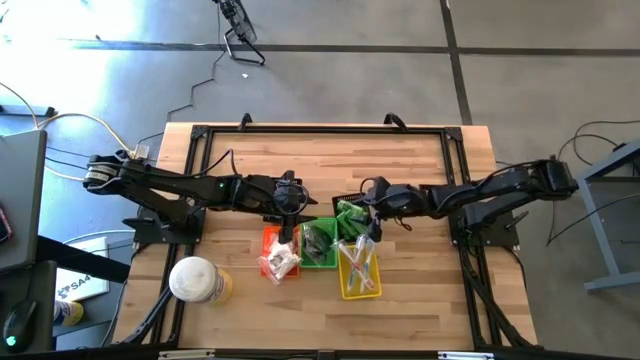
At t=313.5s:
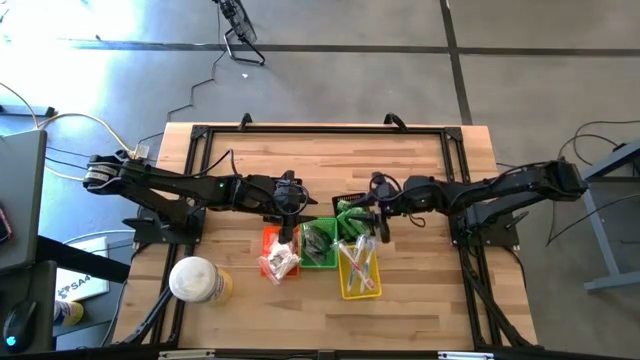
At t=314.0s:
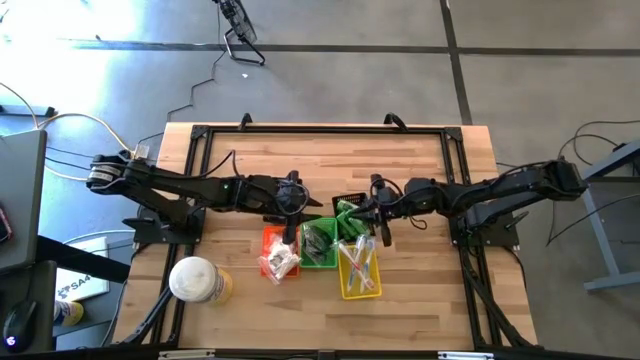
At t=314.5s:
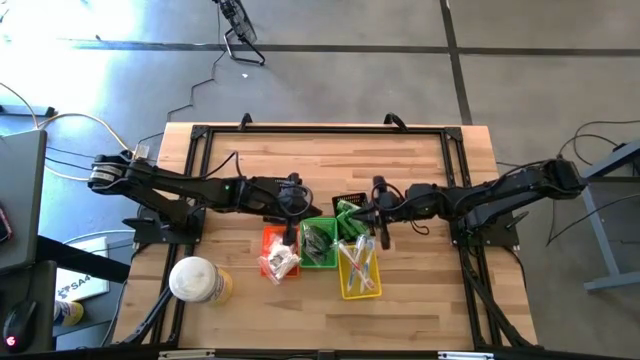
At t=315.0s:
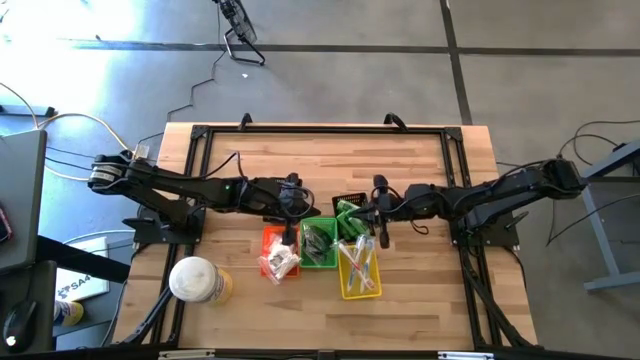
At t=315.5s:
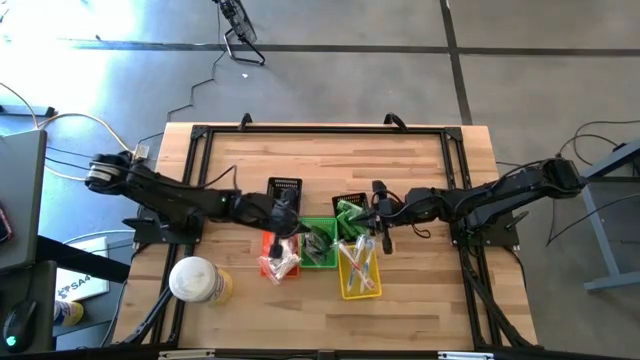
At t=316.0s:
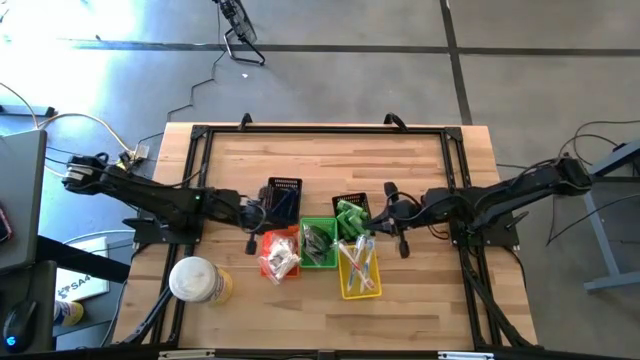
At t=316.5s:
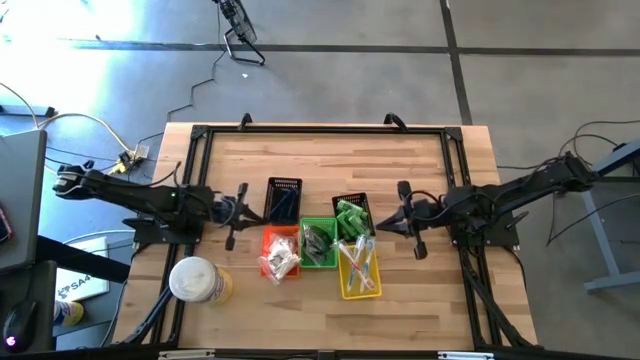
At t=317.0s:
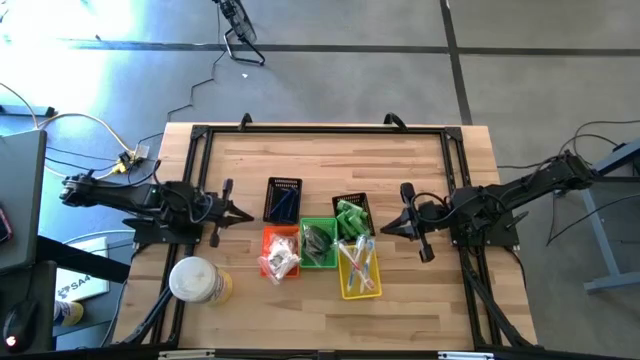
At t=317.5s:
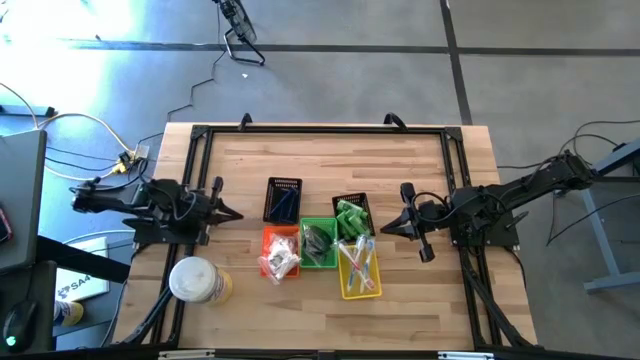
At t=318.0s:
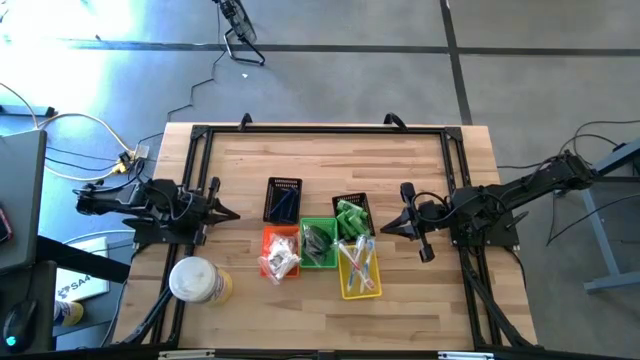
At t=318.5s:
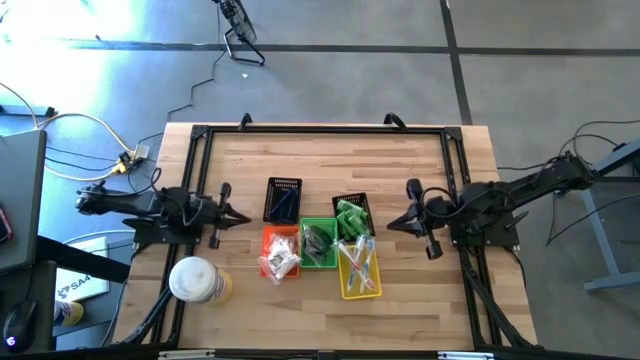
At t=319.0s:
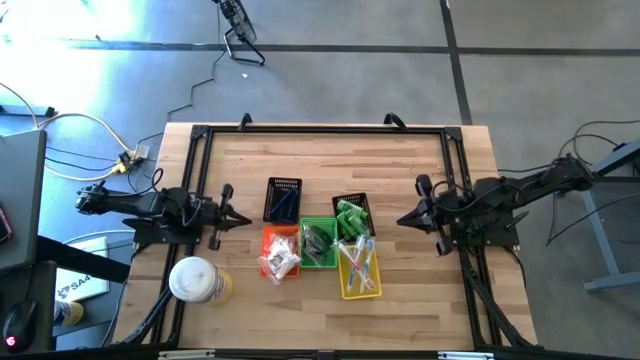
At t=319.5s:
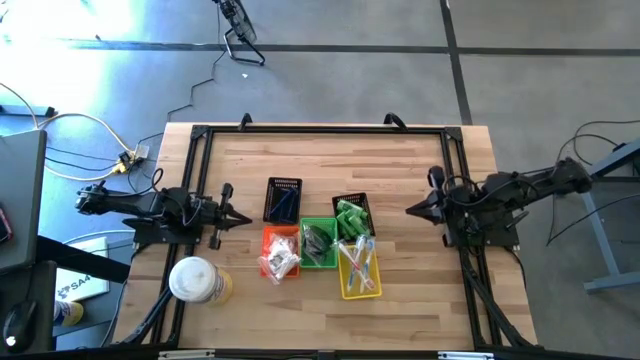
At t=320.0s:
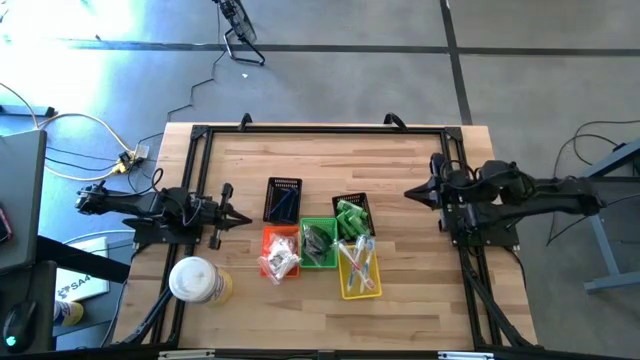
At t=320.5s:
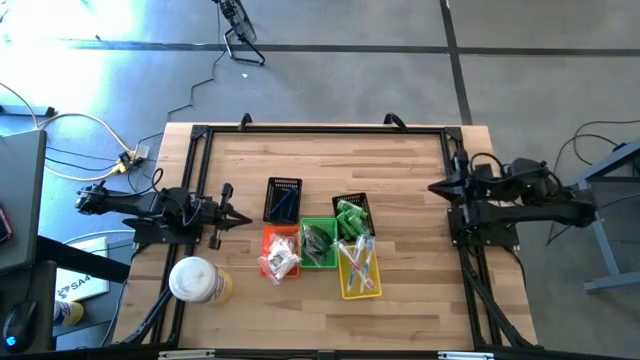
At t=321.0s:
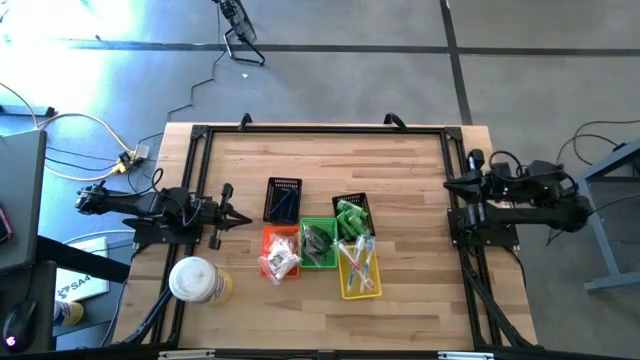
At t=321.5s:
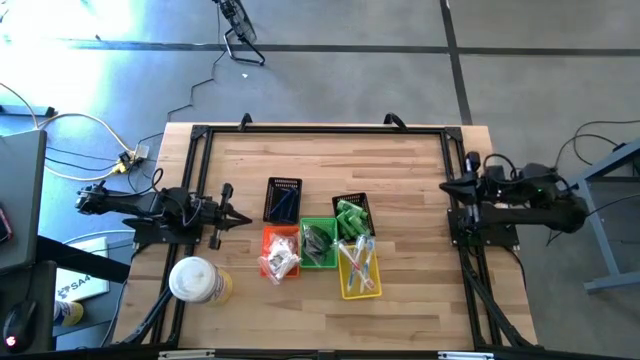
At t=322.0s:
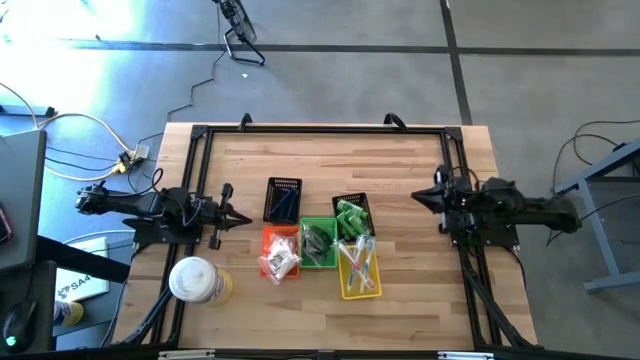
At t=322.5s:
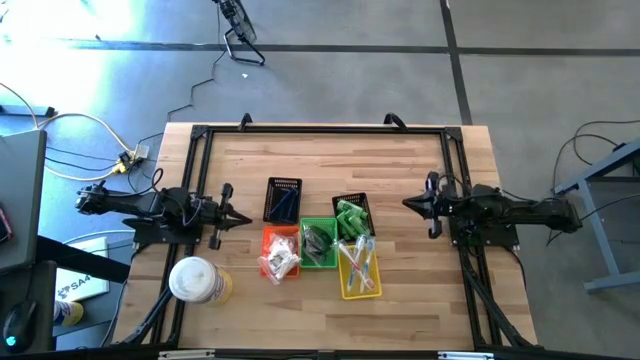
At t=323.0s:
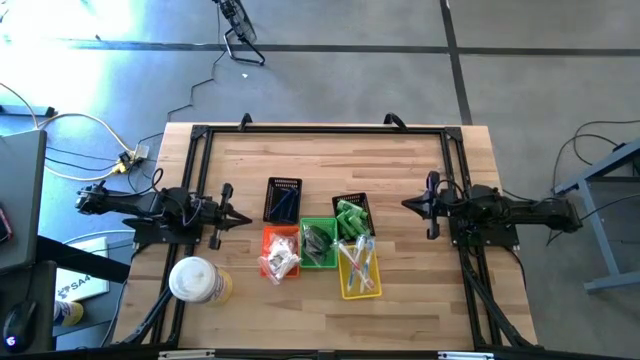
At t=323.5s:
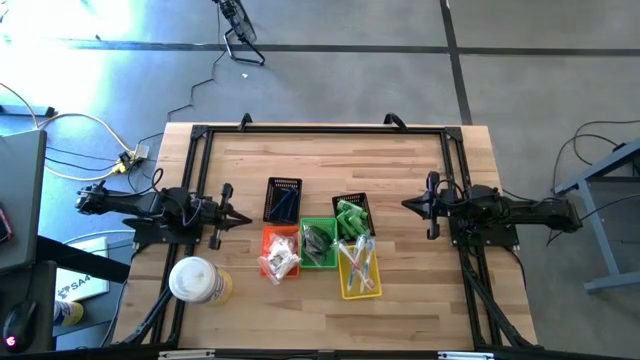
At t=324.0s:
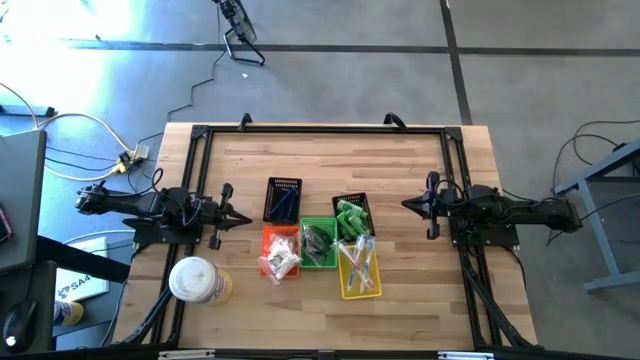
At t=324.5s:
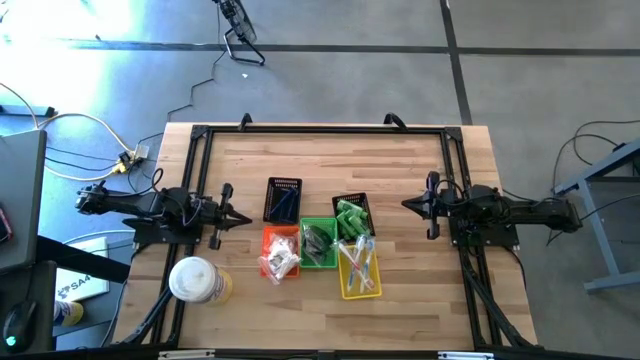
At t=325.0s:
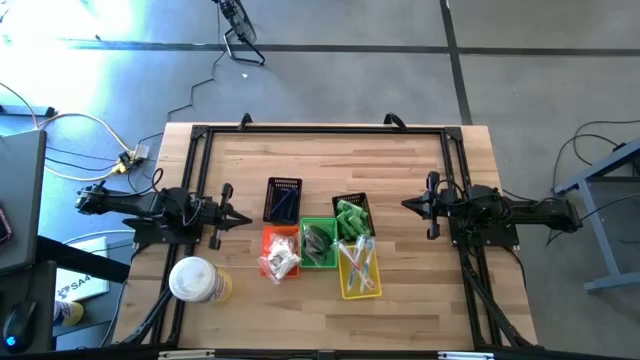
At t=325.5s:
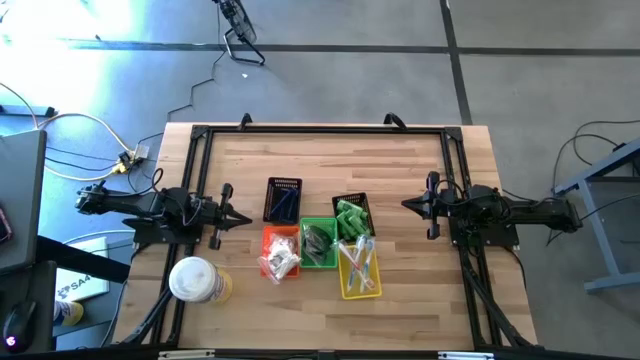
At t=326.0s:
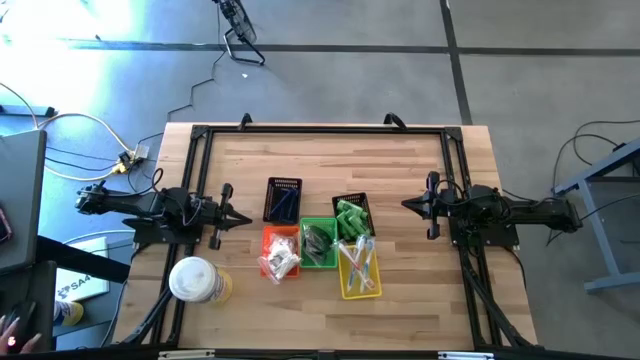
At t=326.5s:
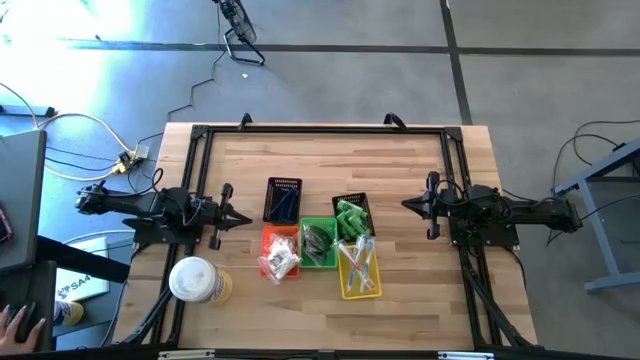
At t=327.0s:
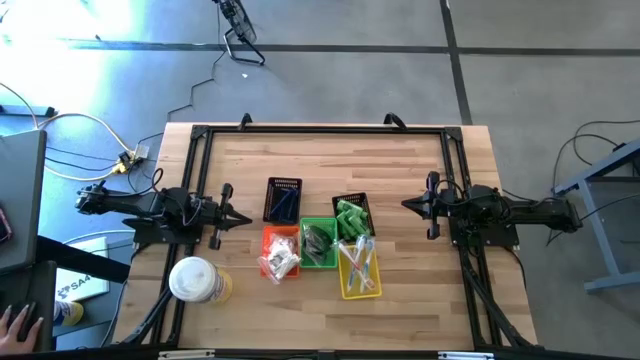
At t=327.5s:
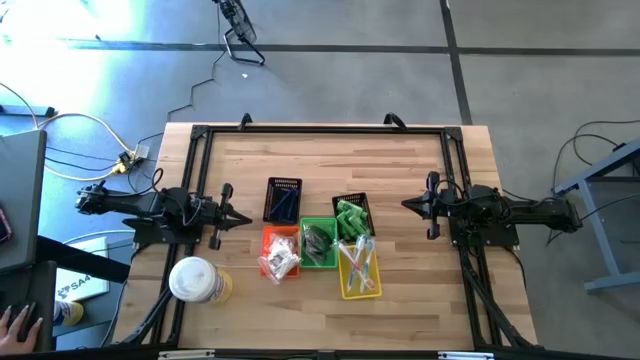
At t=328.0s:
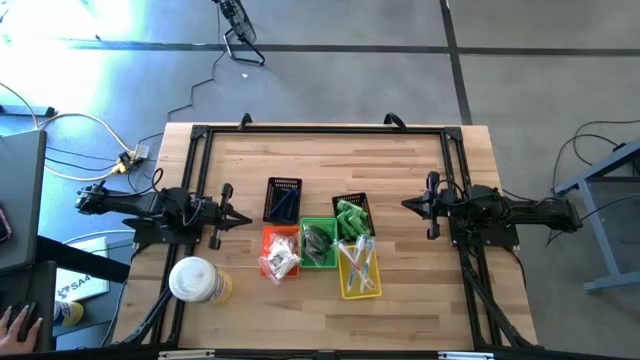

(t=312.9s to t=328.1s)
Task: Pick & Place Travel size toiletries
Return to Home Position

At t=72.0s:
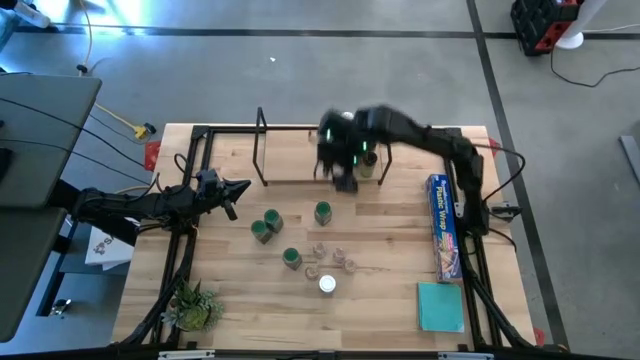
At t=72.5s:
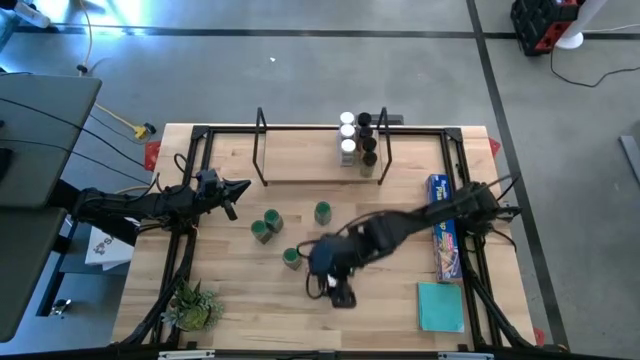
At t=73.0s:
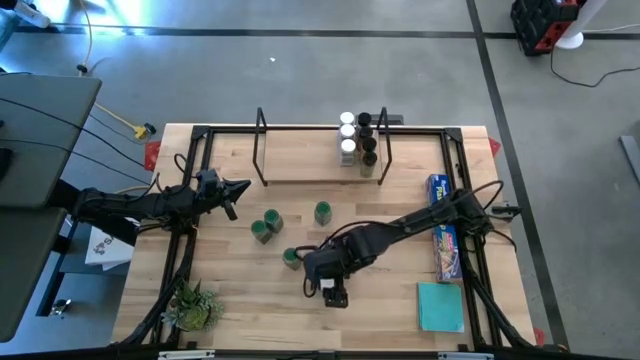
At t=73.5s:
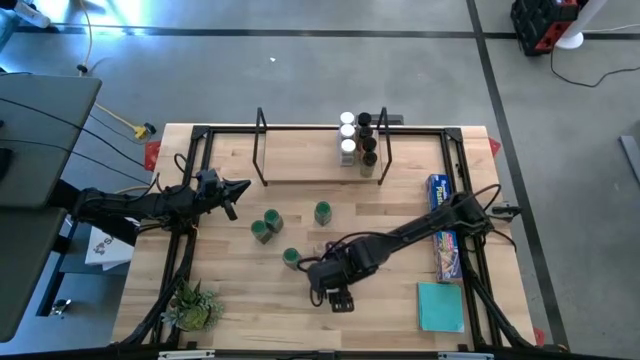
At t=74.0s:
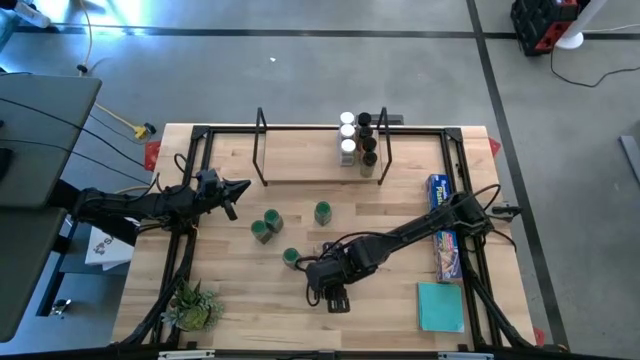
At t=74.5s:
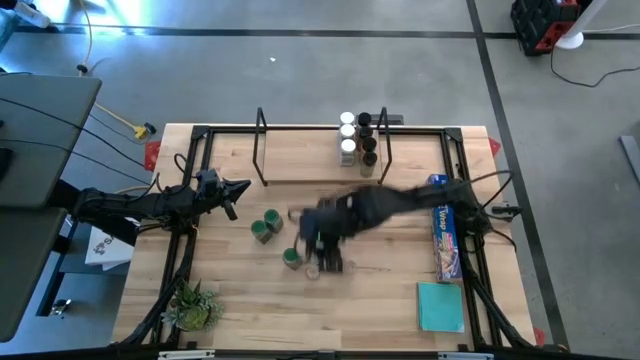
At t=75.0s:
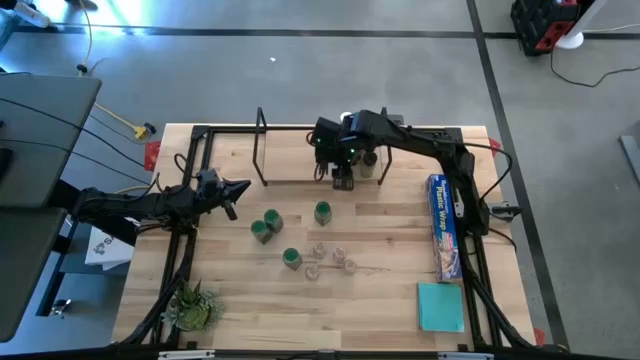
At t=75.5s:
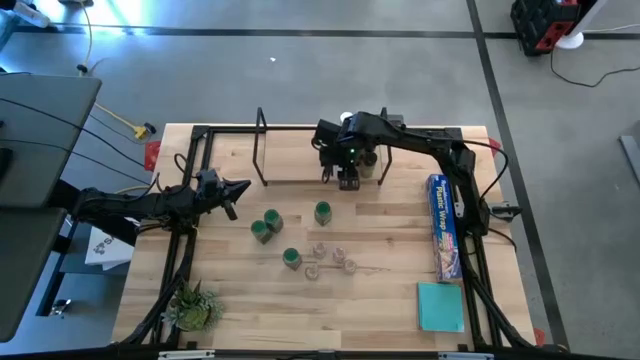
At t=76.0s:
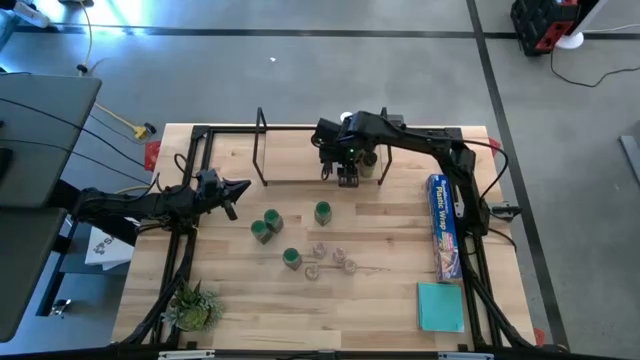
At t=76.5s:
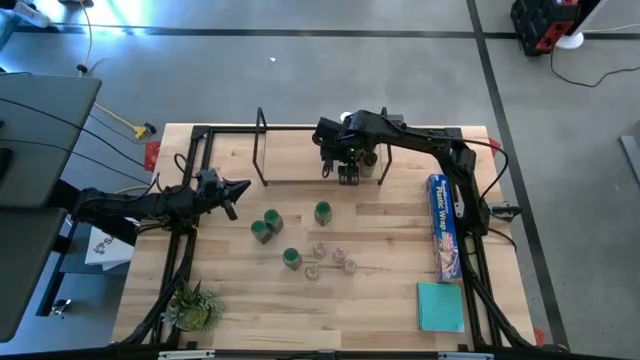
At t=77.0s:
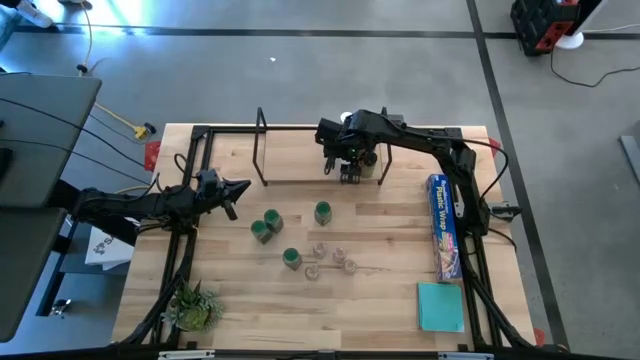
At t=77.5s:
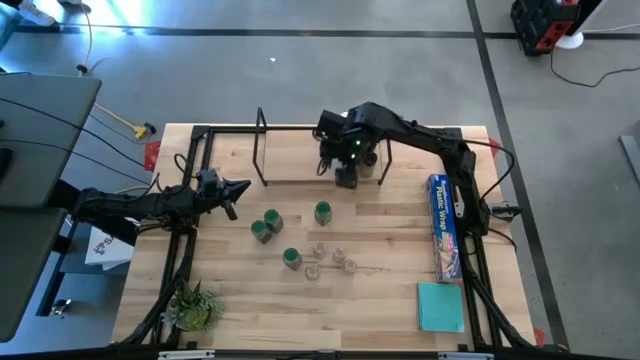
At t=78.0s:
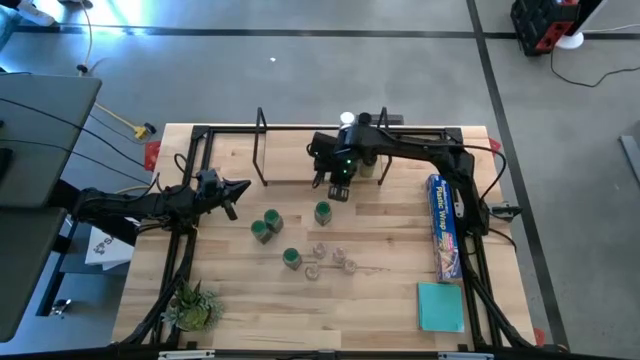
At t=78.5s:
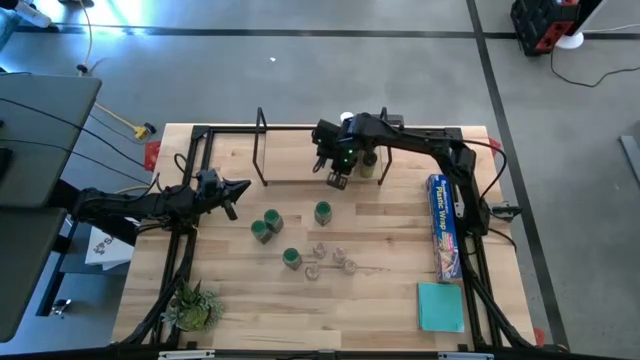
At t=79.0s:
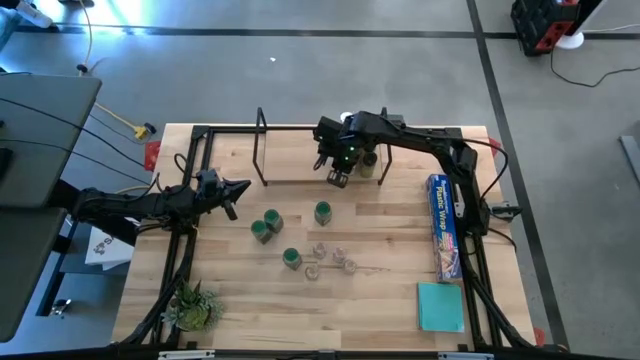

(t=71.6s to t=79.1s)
Task: Shelf spices
Put the white seasoning bottle on the shelf aligned with the other white seasoning bottles
